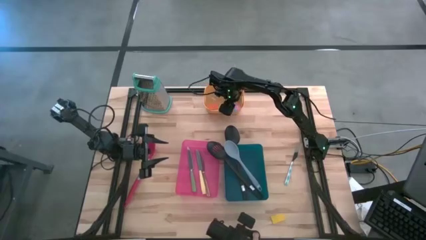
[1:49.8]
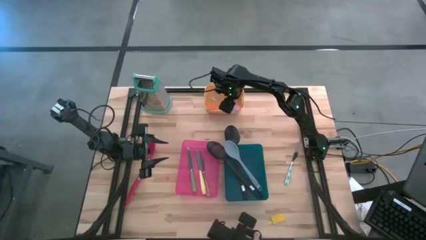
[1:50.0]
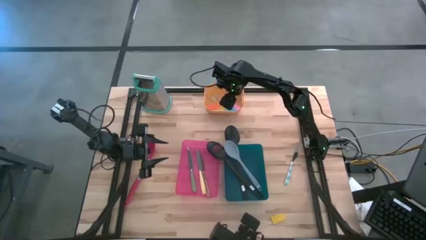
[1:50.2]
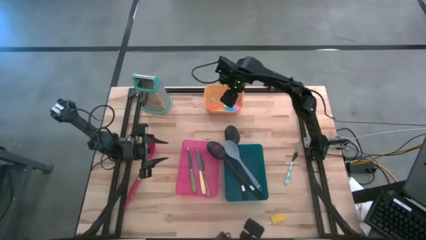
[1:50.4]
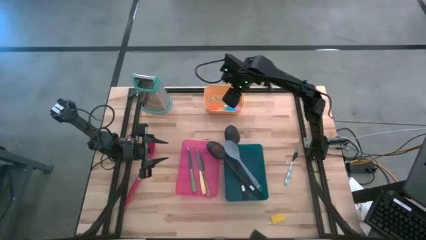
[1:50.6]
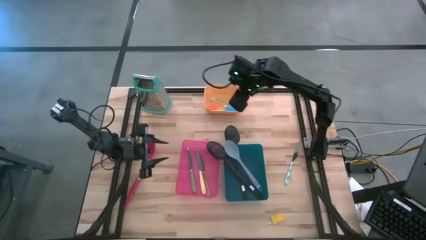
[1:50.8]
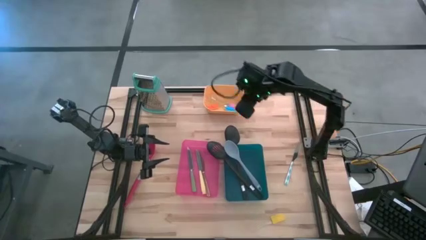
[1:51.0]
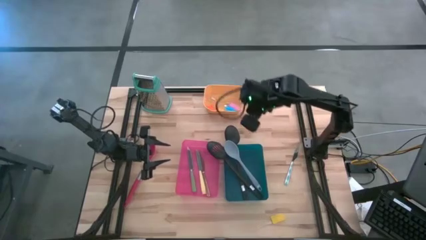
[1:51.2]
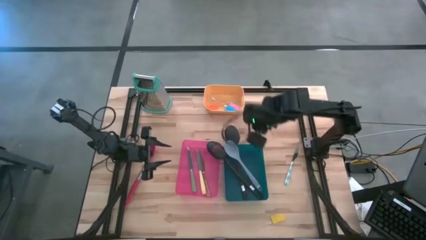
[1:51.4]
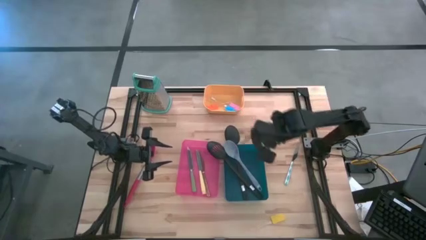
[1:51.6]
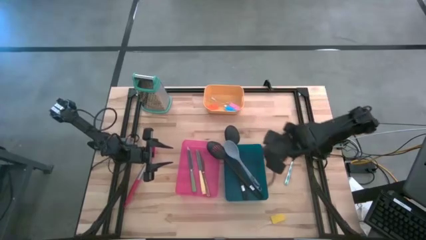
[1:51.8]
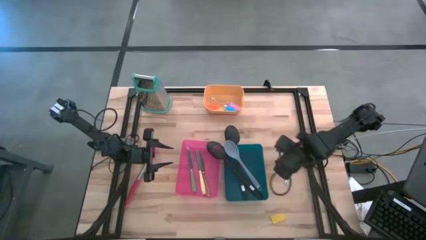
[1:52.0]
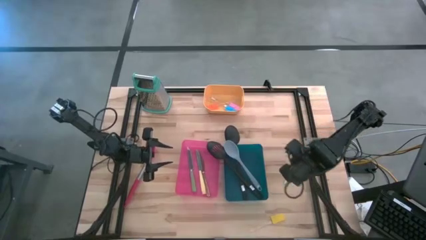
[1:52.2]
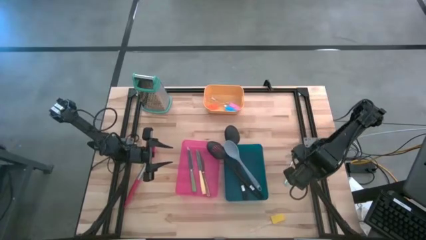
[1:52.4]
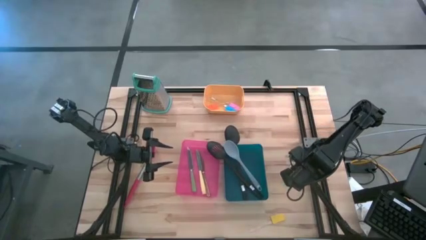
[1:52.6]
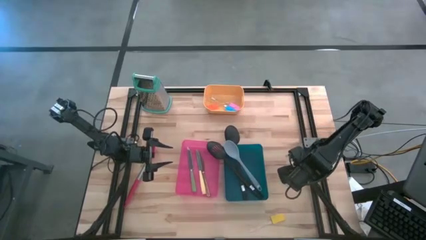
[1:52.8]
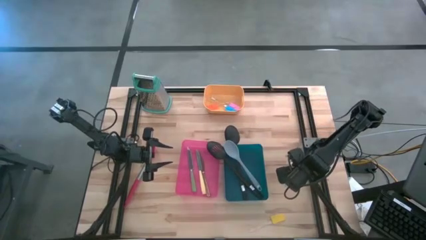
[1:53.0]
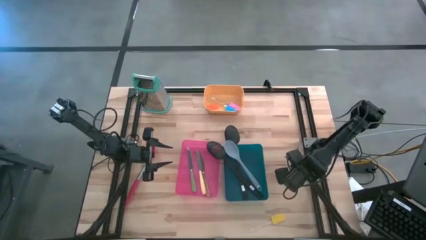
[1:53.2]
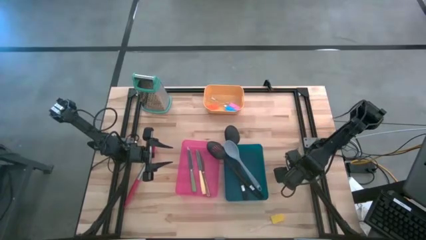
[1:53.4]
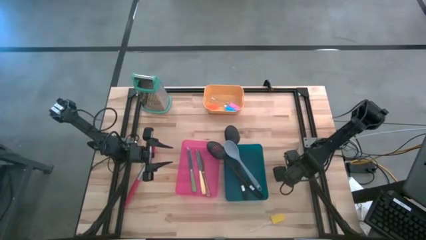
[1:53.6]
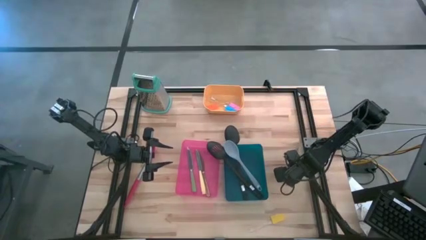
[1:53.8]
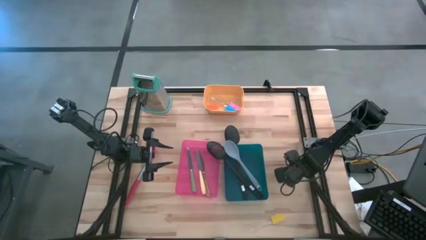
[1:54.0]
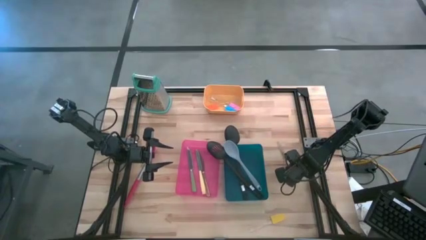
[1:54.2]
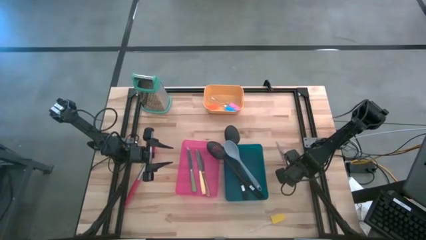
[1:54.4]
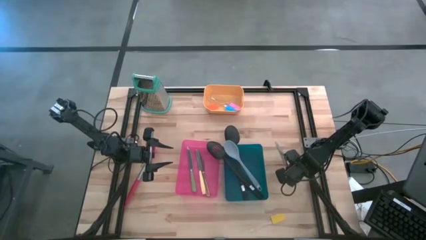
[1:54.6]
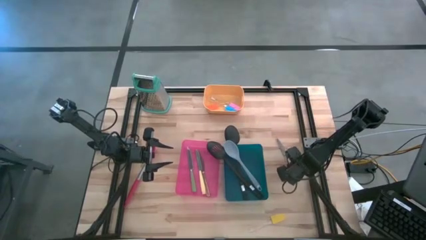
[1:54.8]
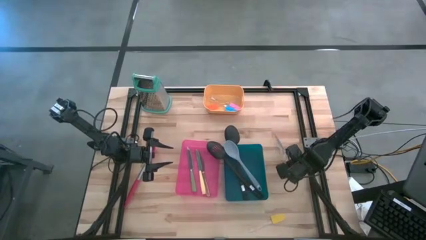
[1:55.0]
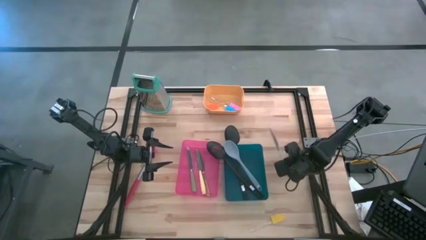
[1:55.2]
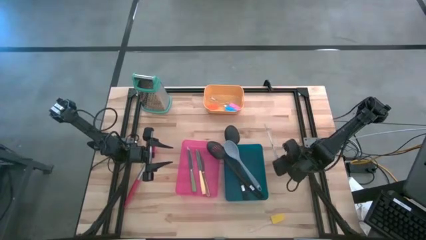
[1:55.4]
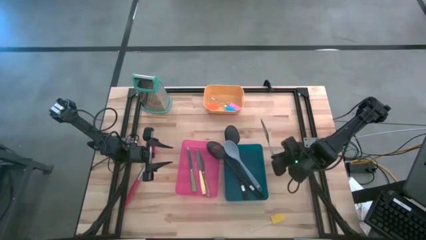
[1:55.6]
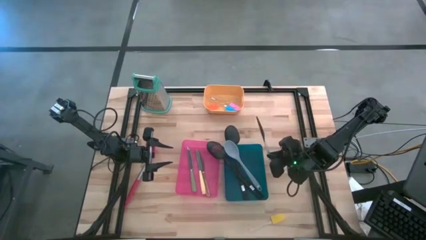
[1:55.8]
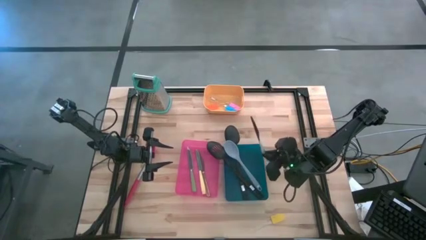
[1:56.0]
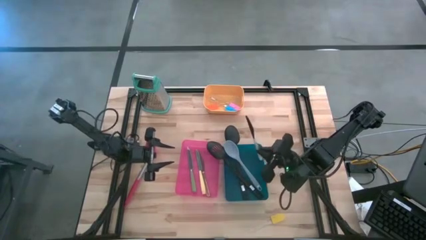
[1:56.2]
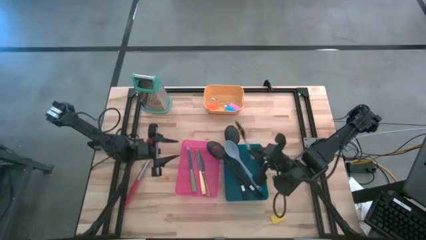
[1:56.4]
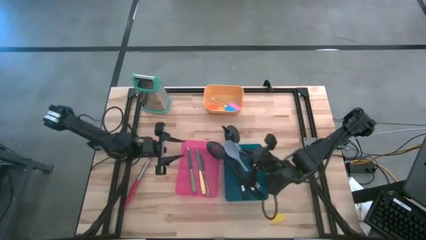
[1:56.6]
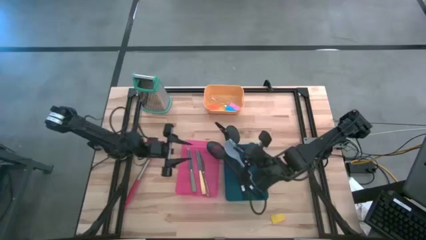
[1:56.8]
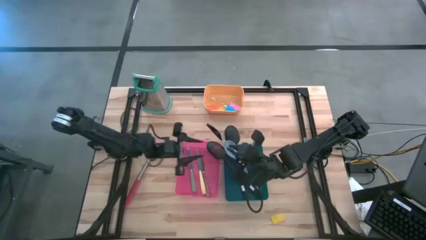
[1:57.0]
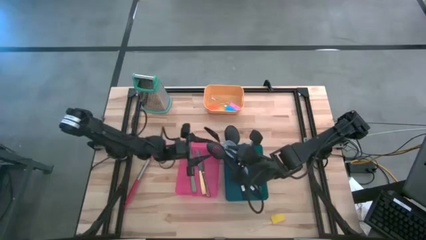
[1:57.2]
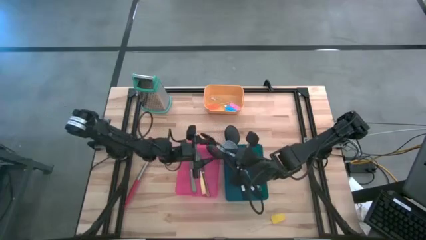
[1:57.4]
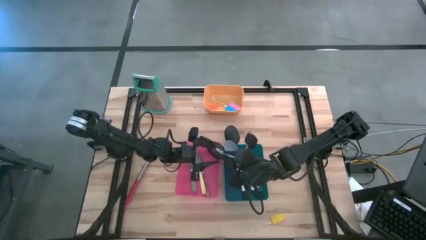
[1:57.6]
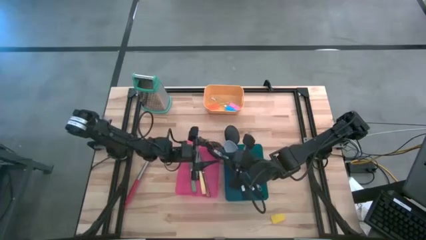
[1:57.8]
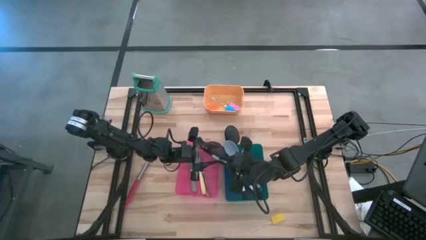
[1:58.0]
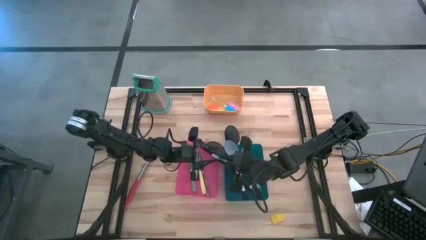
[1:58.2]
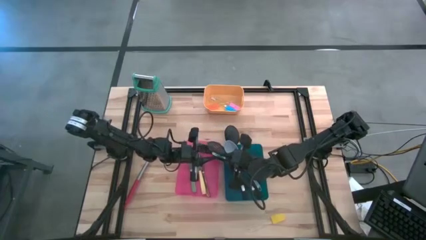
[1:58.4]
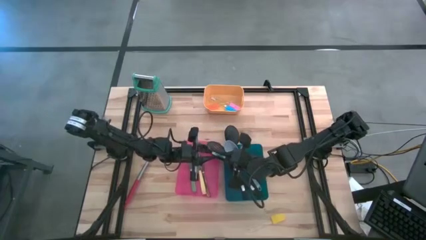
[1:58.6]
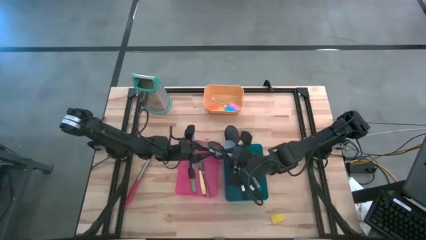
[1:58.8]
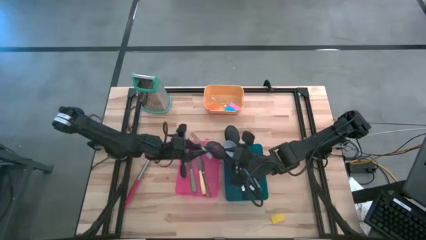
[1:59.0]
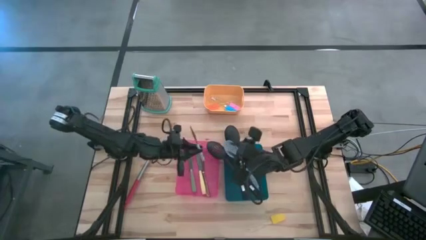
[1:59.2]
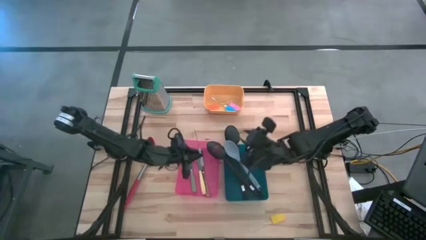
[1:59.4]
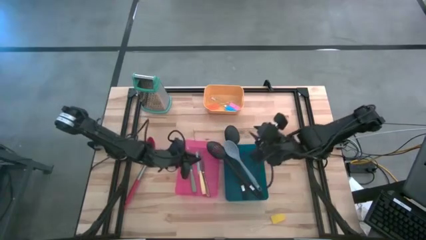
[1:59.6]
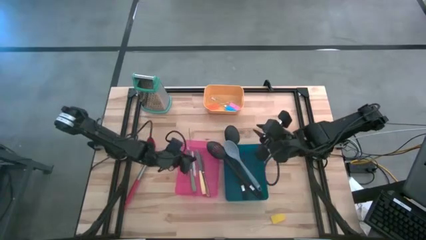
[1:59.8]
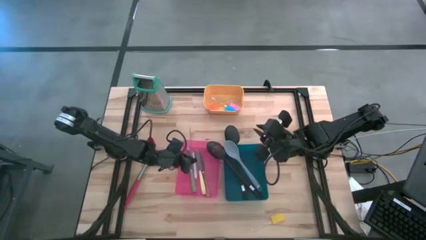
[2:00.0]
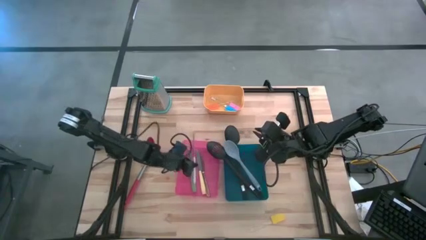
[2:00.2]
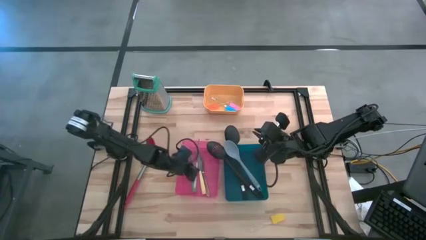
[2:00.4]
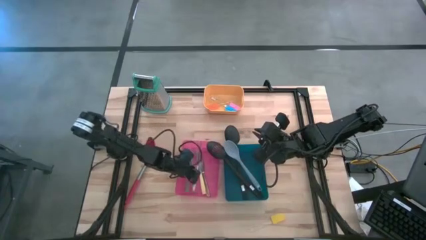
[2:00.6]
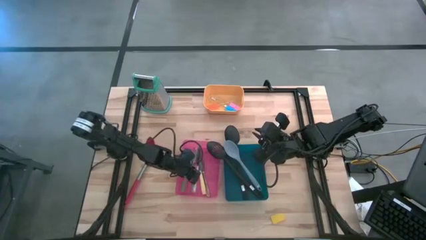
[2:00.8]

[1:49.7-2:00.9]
Task: Pick & Place Kitchen Items
Put the blue knife into the red bin

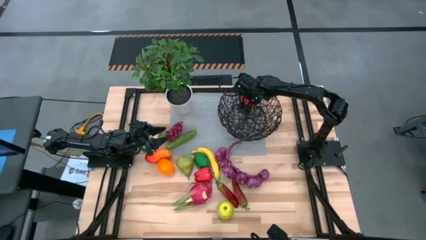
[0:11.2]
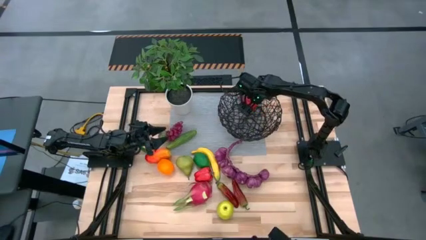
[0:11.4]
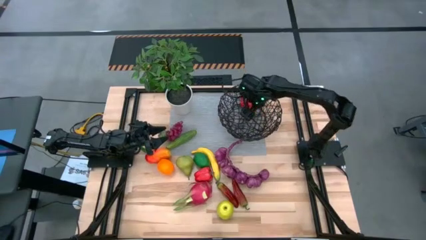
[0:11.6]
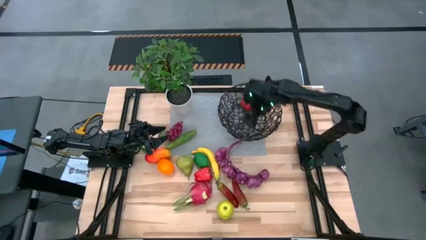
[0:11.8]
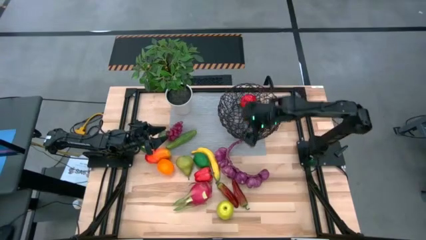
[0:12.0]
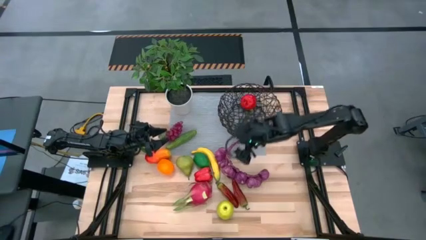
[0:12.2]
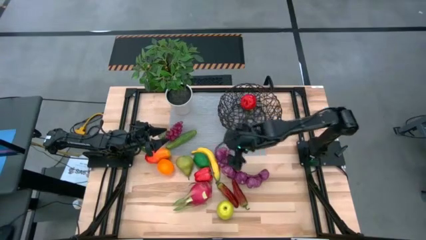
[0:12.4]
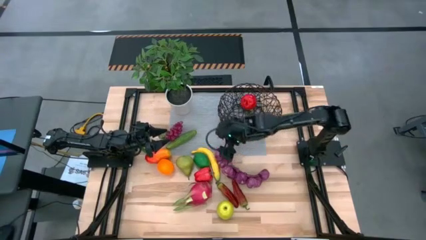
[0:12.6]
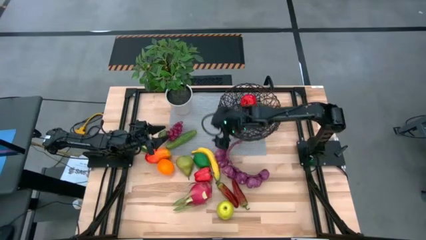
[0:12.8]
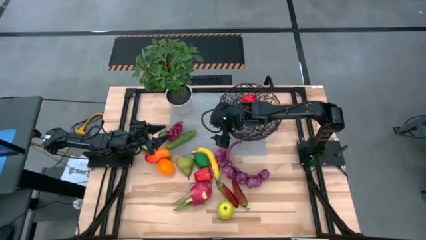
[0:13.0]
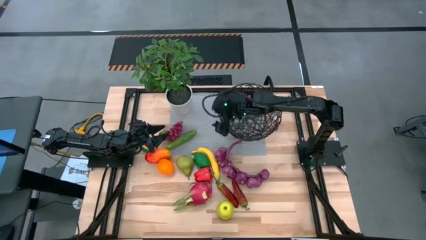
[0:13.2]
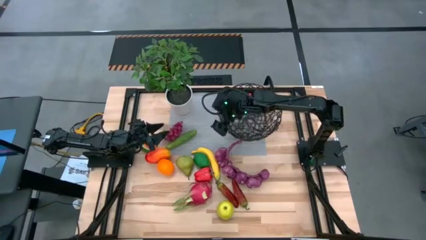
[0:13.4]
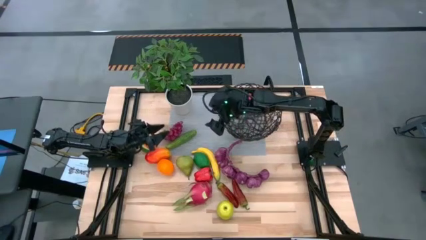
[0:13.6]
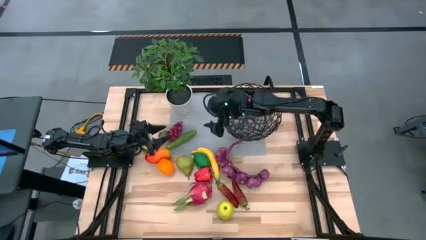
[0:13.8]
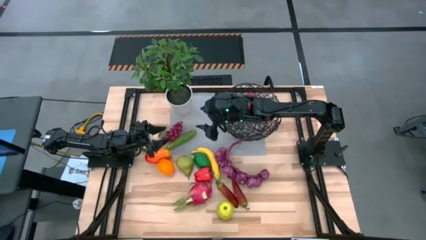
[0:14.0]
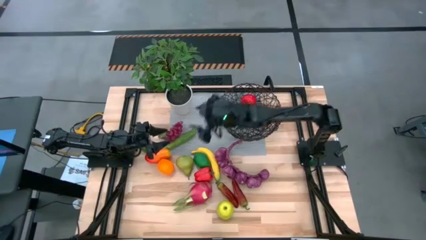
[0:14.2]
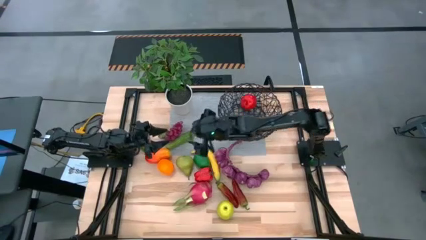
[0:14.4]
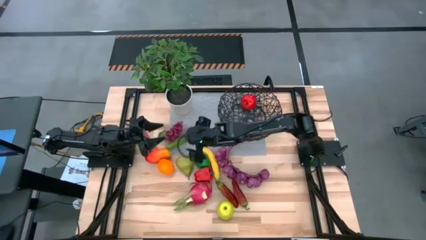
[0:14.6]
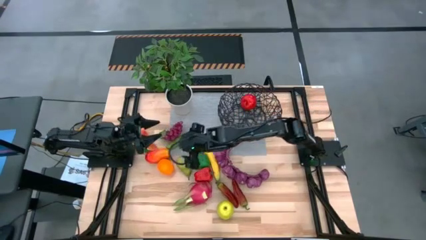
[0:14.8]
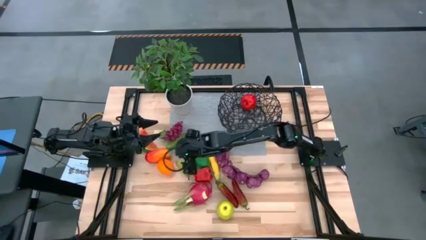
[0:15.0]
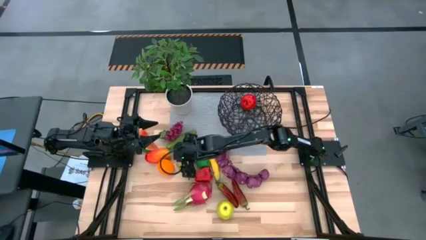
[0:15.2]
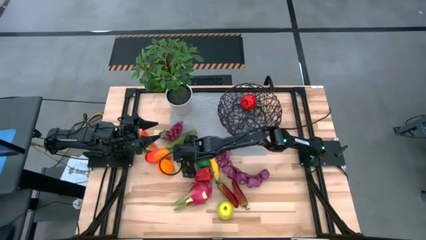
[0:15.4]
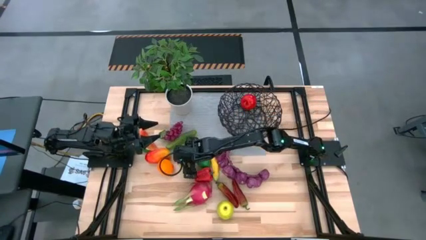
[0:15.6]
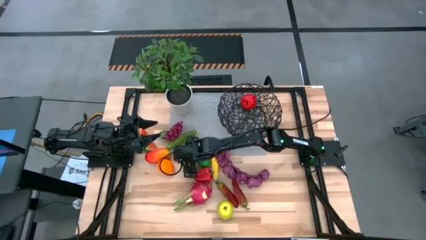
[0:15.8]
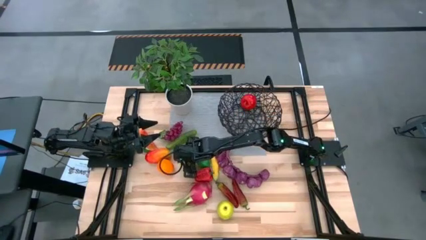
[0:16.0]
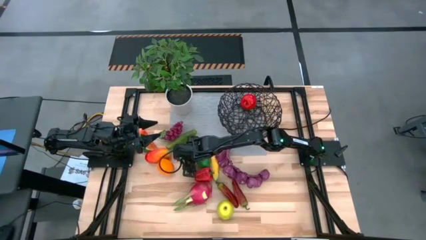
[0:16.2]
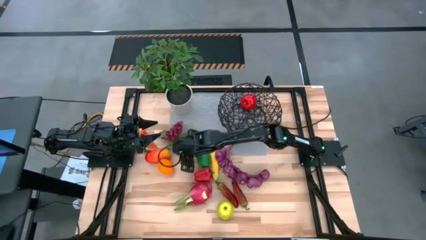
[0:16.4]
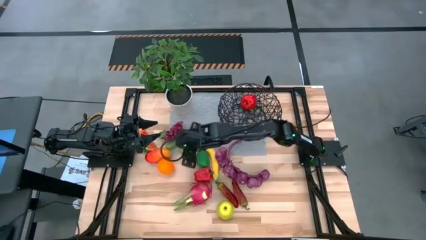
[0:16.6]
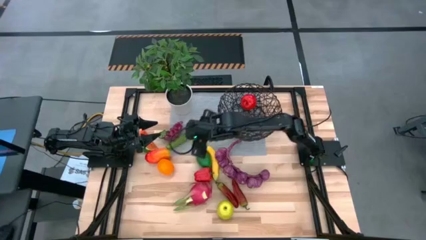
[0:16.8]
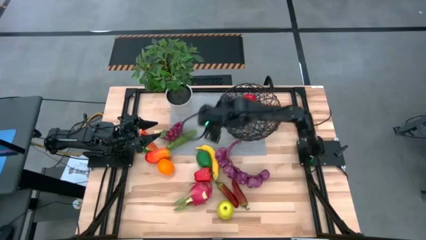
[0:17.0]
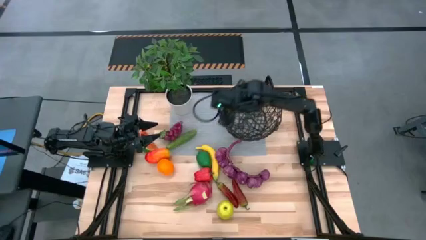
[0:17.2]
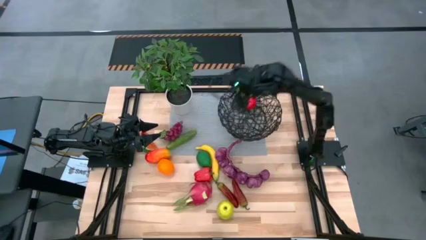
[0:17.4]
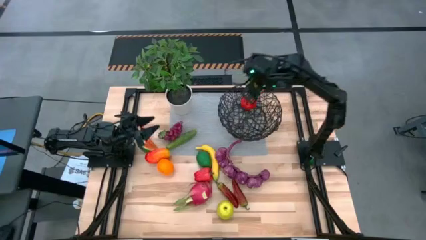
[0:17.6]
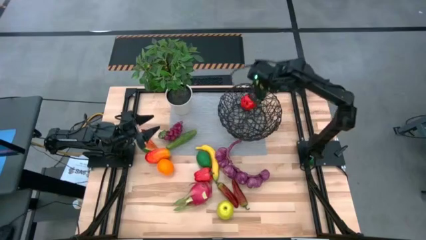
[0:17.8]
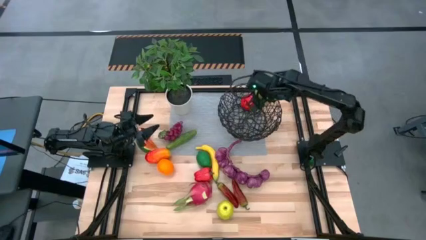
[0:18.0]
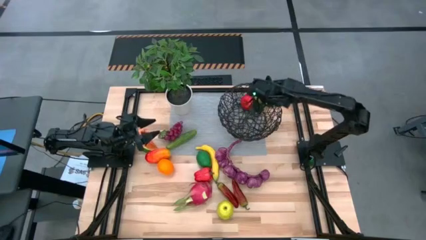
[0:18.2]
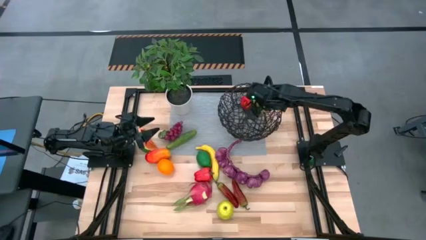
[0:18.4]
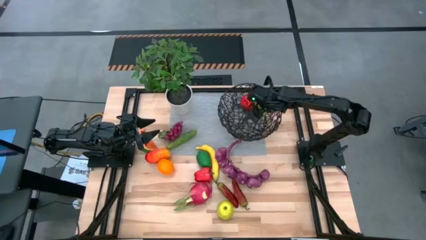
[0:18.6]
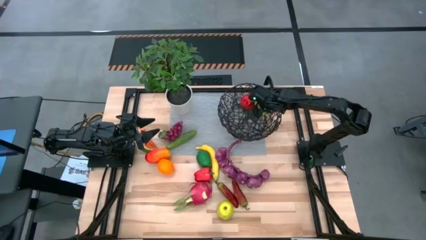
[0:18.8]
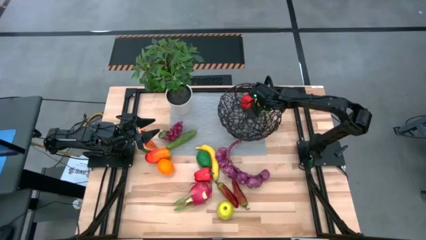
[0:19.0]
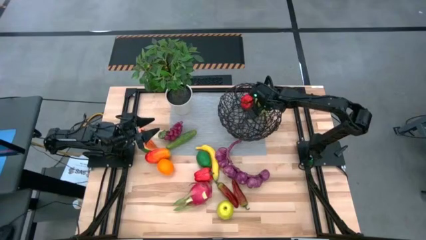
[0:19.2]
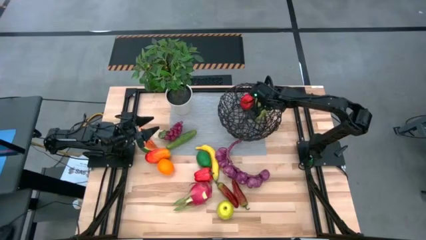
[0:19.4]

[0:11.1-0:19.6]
Task: Build produce basket
Put the pear into the wire basket
